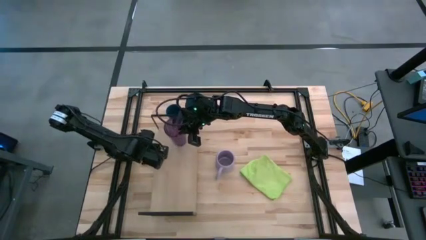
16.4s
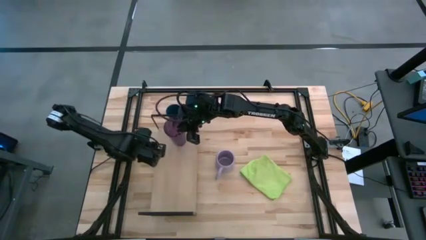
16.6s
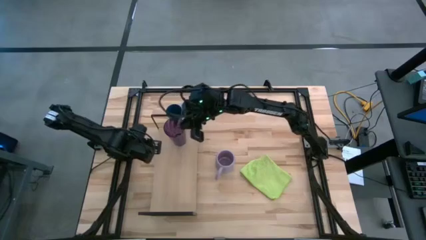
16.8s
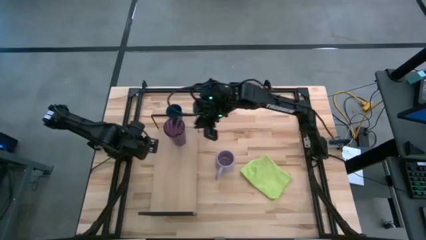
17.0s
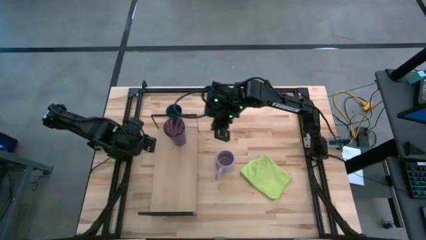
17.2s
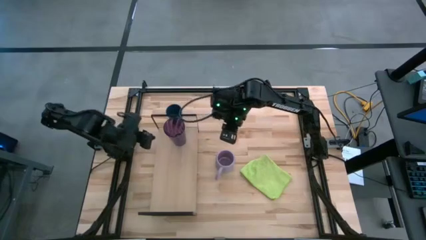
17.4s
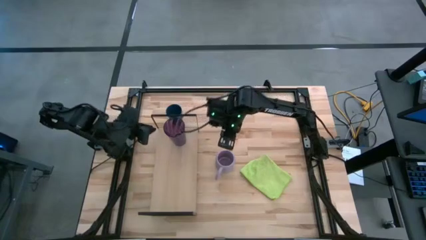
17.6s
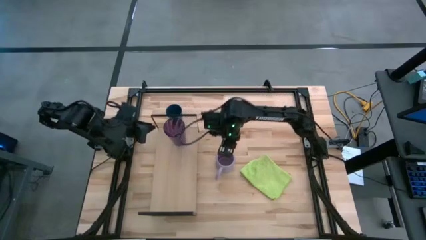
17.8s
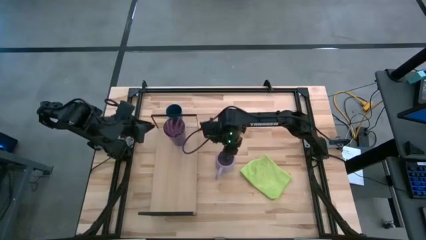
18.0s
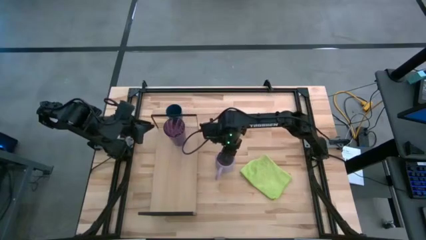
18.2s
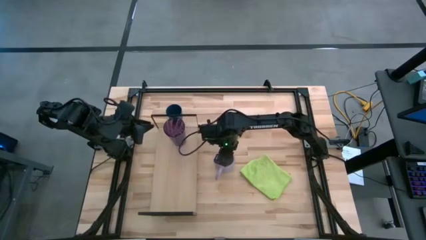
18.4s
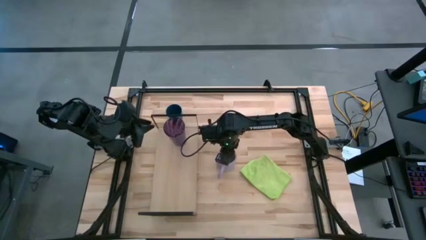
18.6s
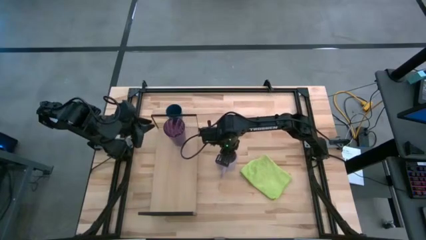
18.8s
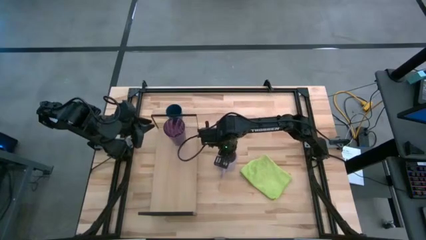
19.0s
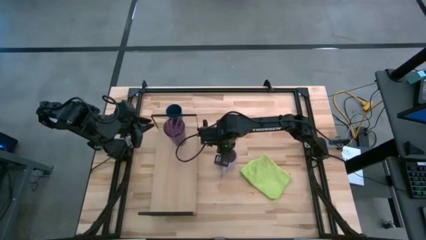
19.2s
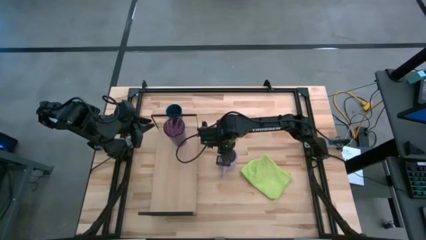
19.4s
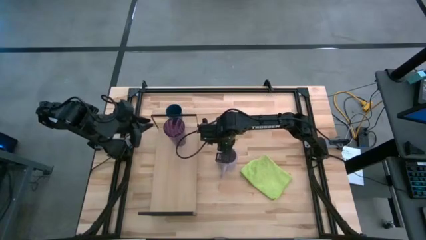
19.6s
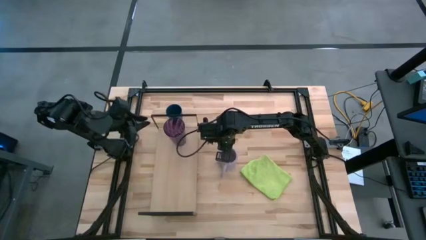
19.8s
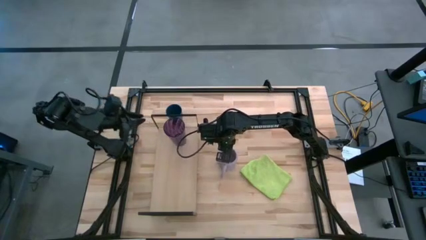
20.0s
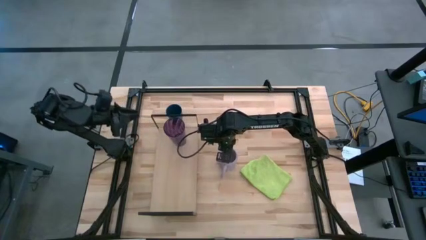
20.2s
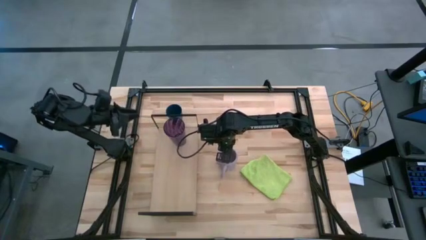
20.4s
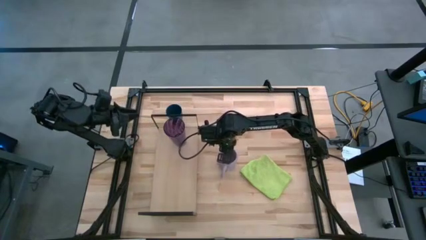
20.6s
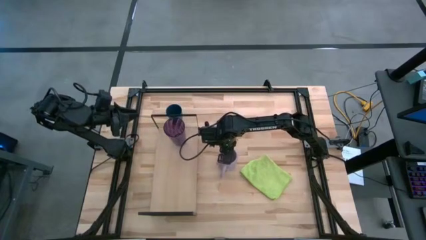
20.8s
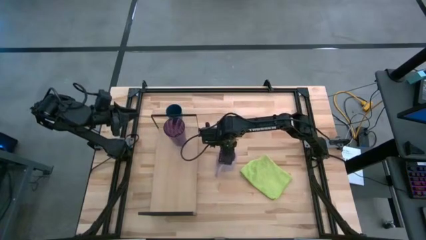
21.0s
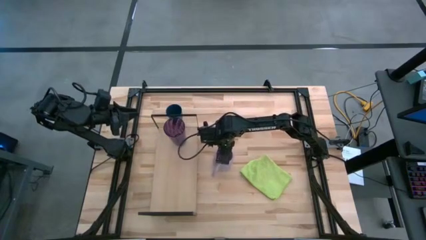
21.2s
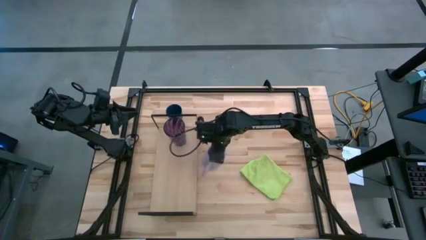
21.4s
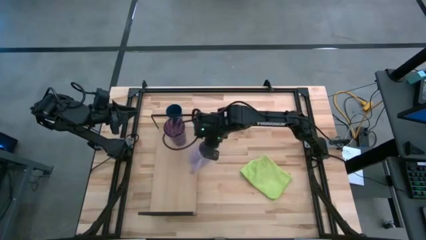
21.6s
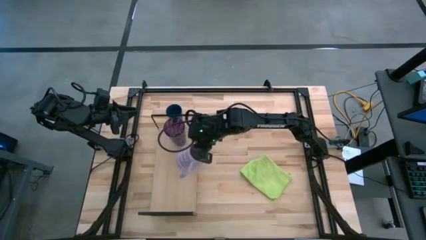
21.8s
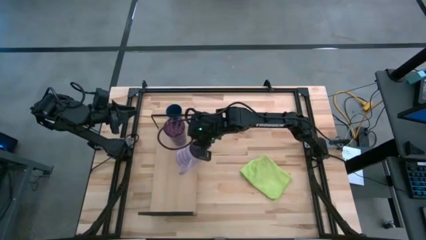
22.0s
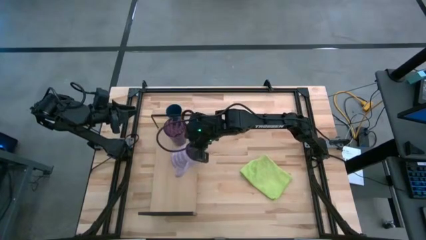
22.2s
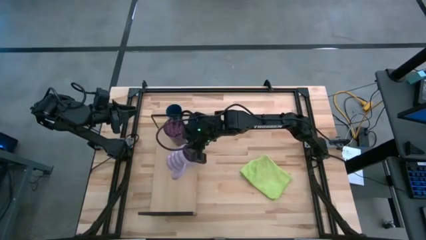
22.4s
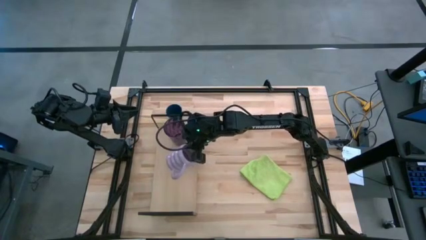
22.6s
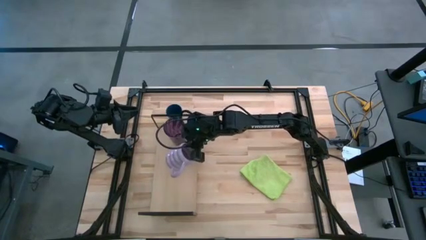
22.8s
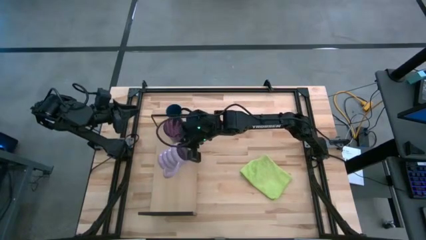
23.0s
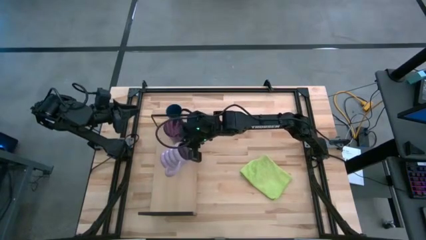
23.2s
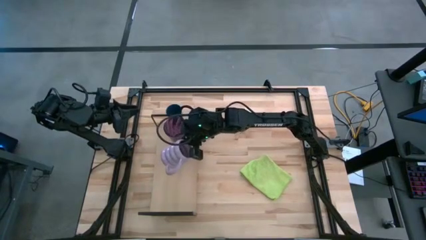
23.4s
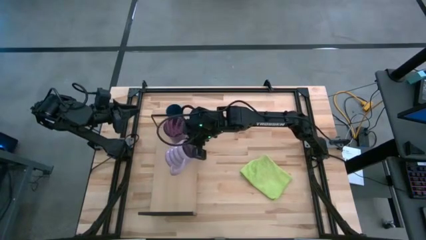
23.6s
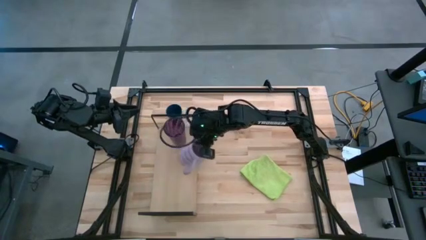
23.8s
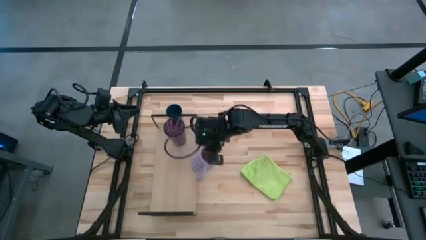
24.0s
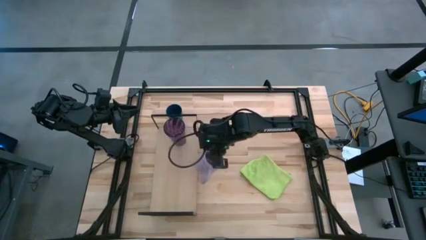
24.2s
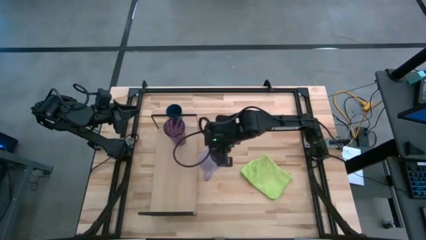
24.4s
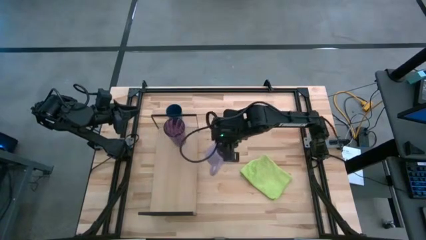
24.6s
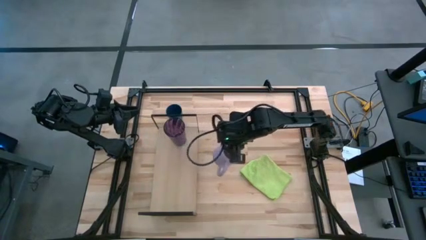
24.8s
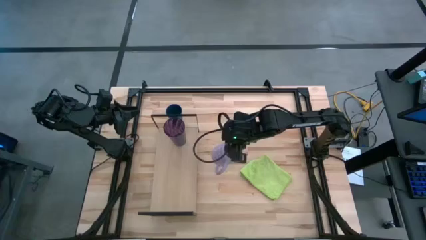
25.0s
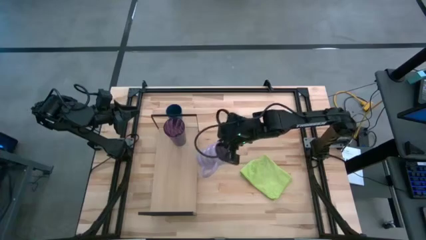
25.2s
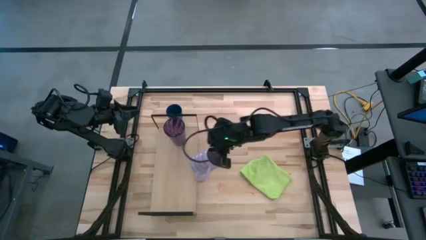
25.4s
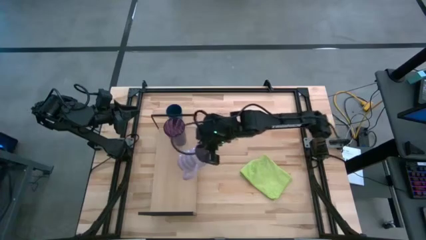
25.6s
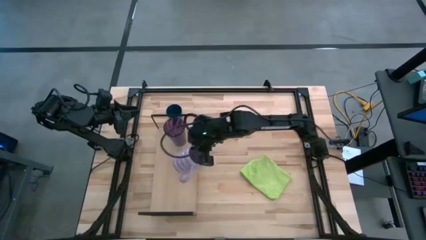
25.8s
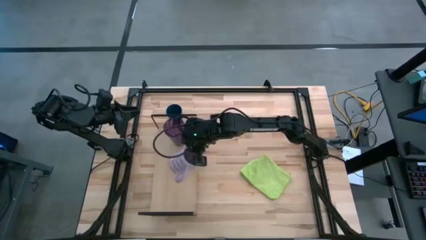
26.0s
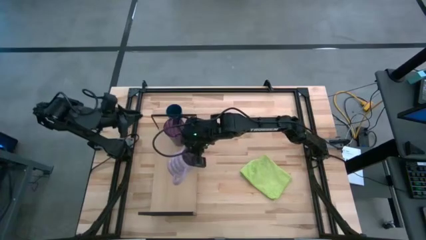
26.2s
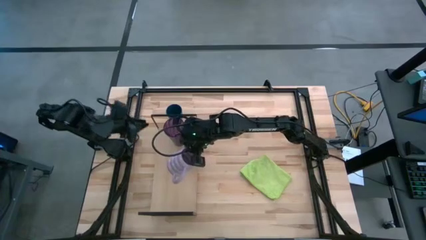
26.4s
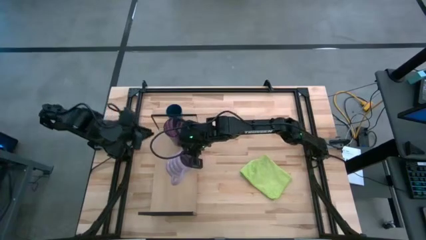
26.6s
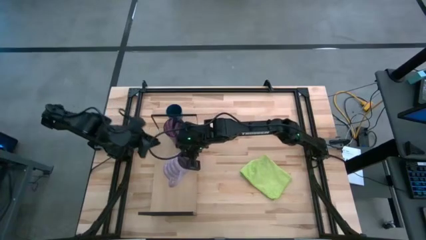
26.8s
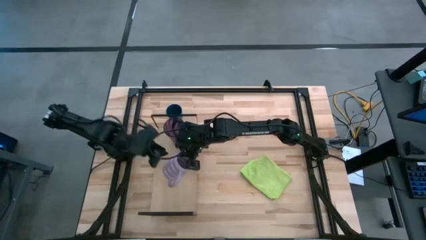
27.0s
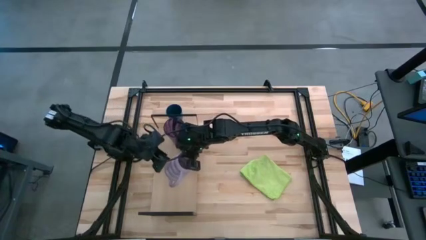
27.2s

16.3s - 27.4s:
Task: Stack small to large cups/mugs on shelf
Put purple mug on the shelf
